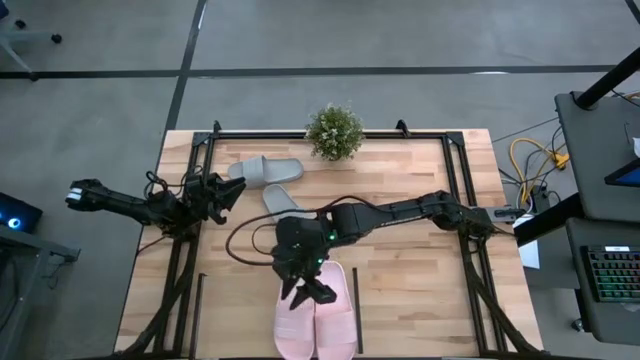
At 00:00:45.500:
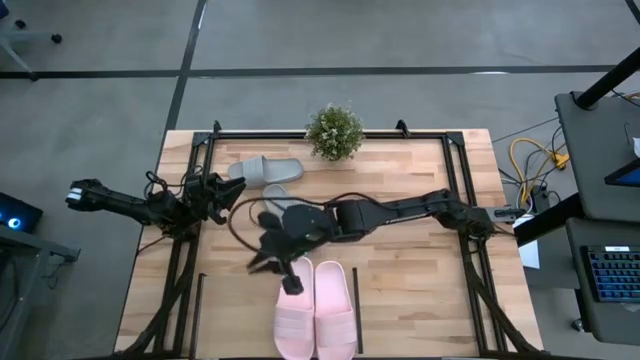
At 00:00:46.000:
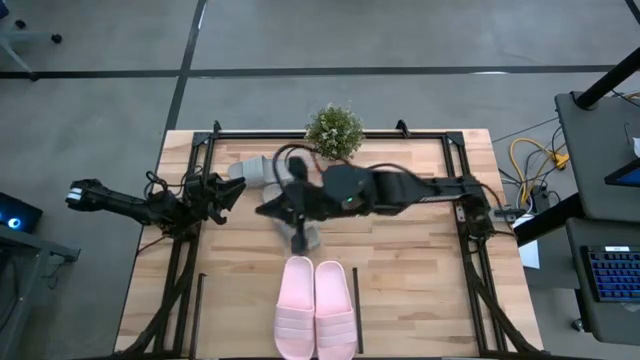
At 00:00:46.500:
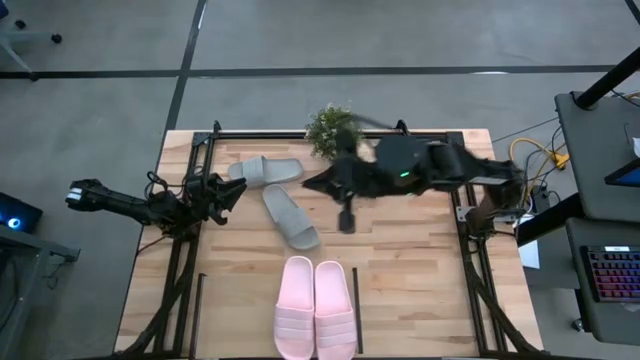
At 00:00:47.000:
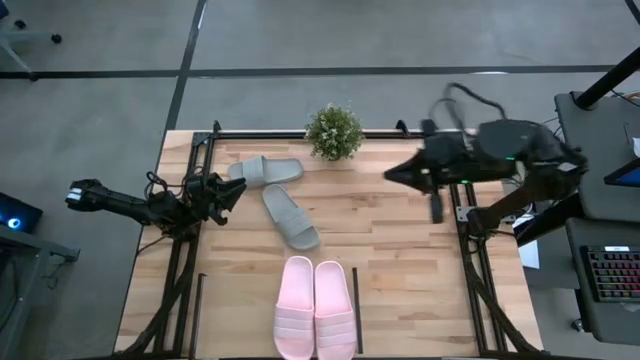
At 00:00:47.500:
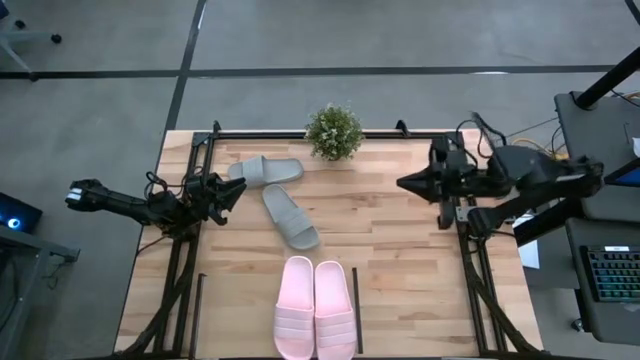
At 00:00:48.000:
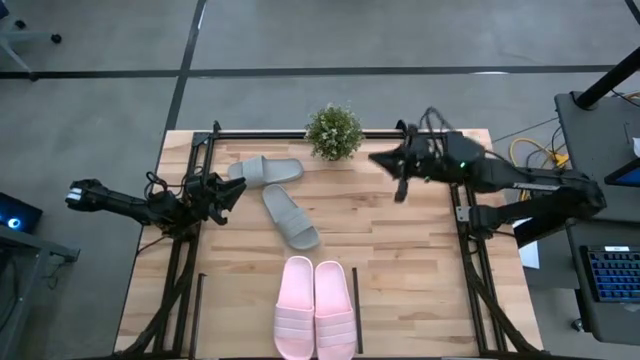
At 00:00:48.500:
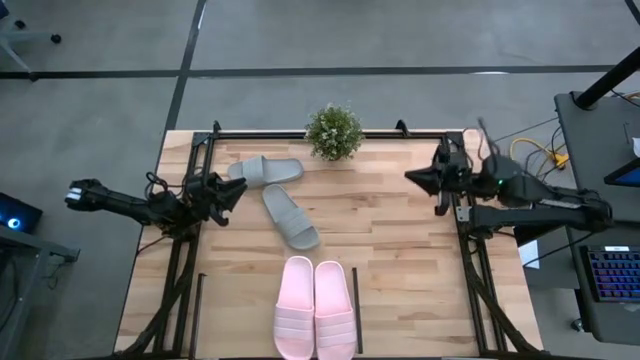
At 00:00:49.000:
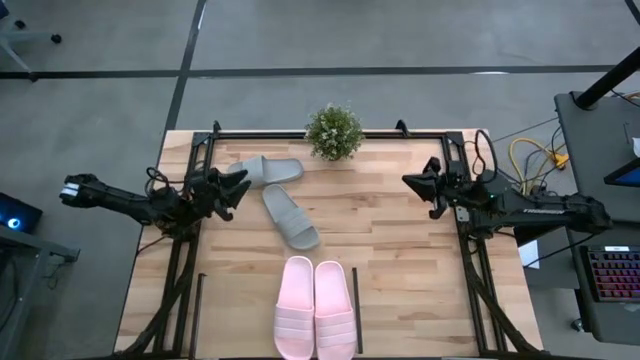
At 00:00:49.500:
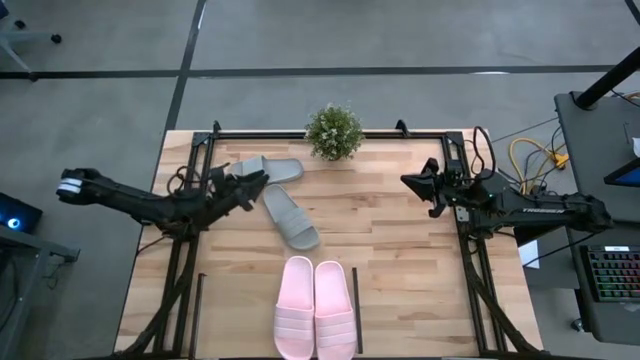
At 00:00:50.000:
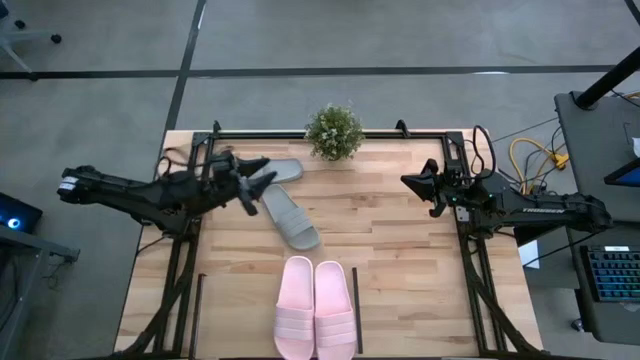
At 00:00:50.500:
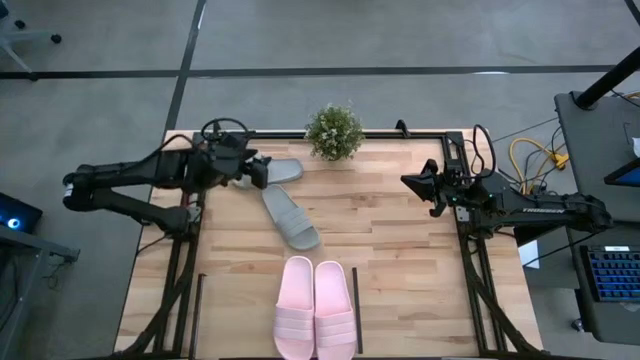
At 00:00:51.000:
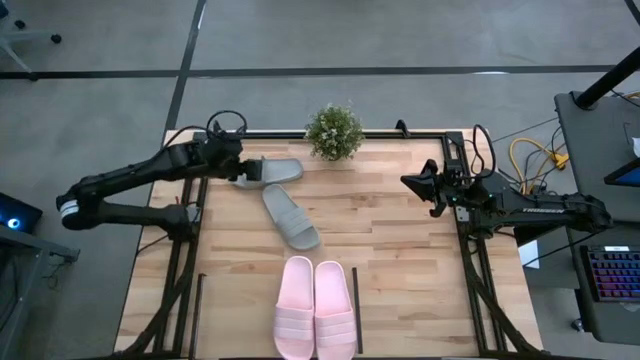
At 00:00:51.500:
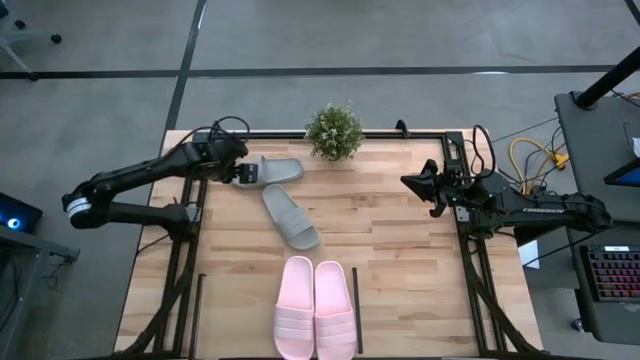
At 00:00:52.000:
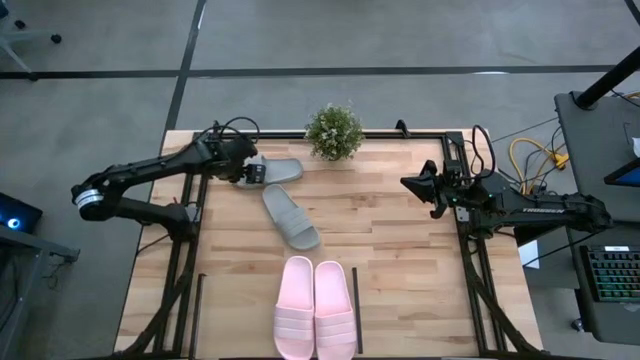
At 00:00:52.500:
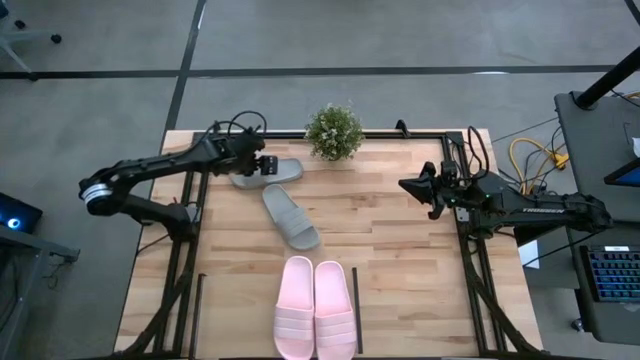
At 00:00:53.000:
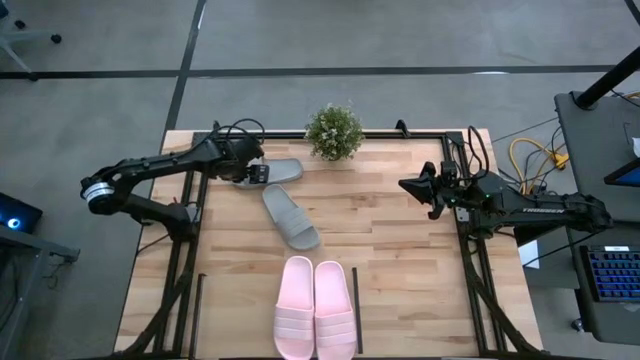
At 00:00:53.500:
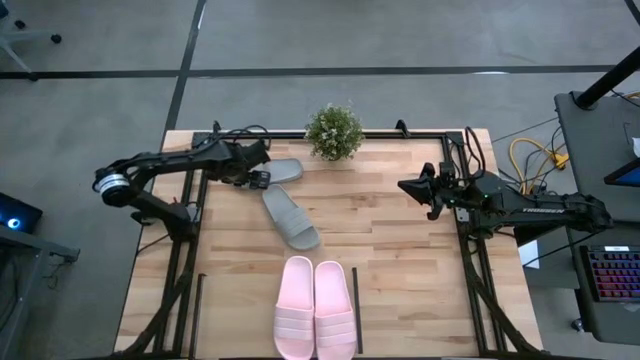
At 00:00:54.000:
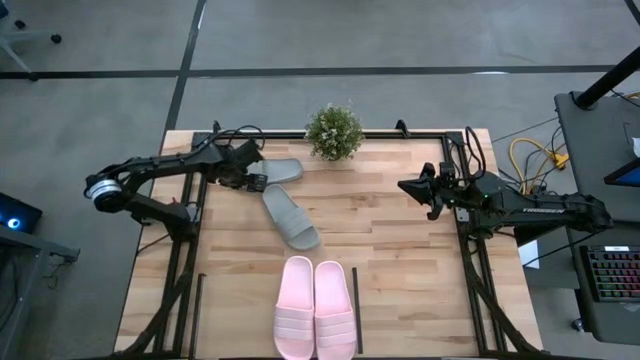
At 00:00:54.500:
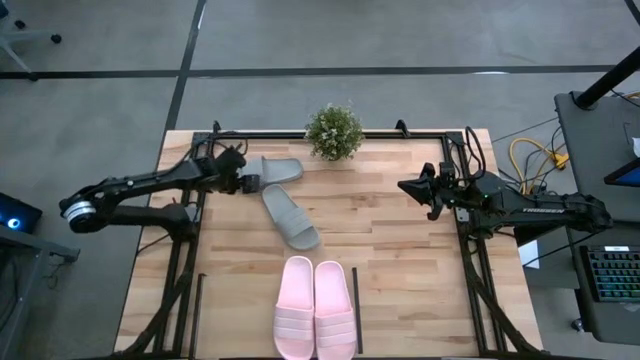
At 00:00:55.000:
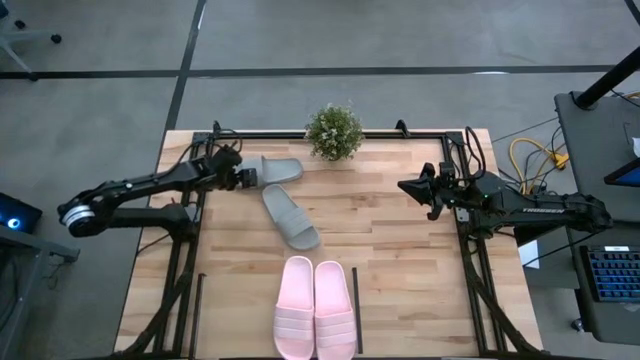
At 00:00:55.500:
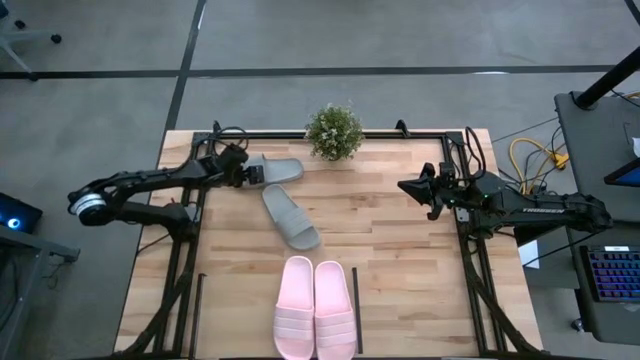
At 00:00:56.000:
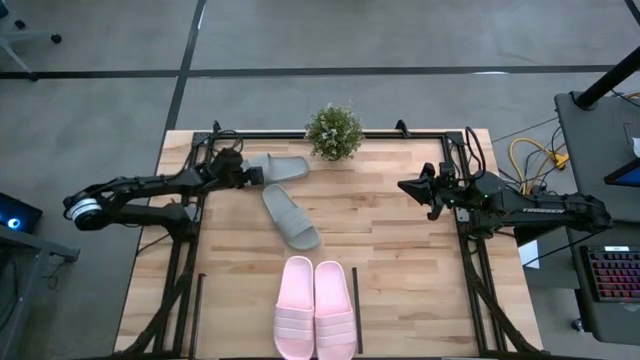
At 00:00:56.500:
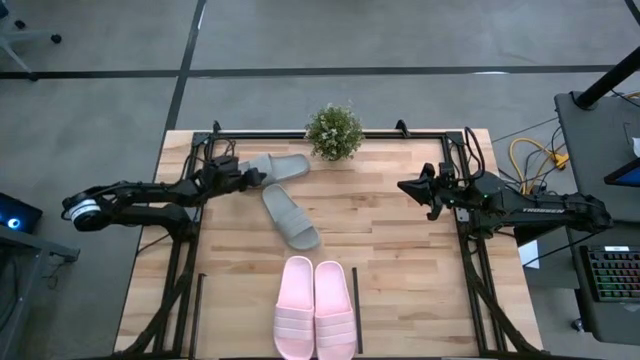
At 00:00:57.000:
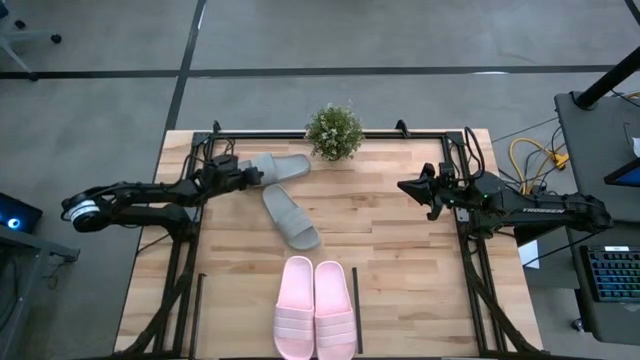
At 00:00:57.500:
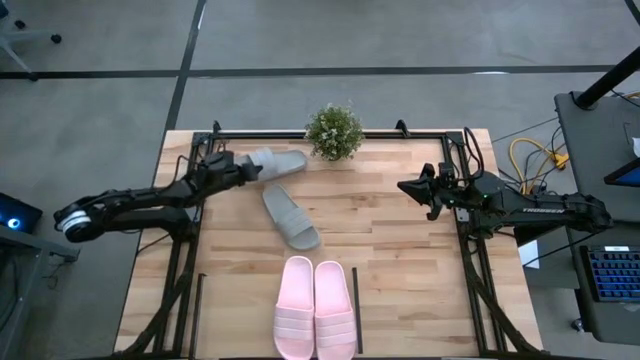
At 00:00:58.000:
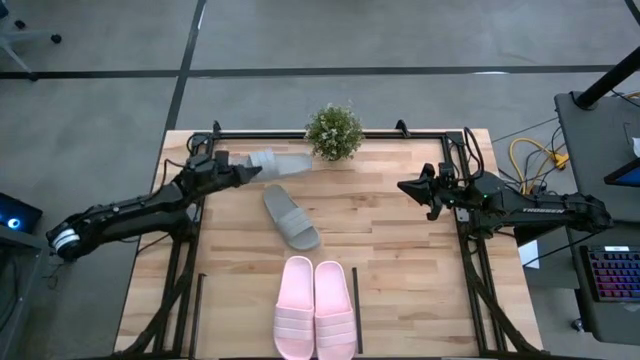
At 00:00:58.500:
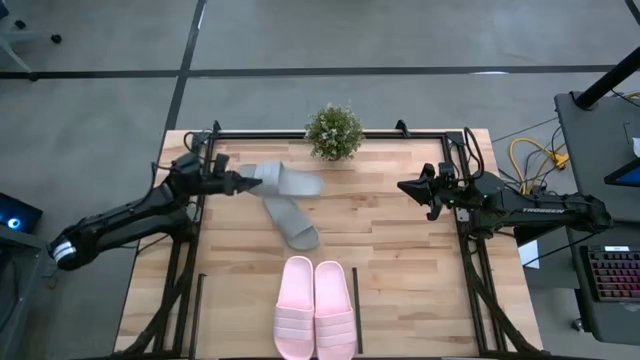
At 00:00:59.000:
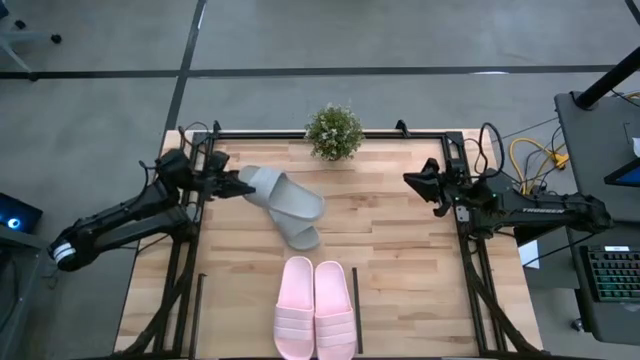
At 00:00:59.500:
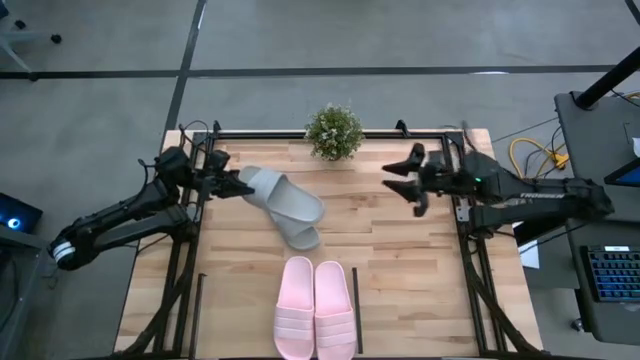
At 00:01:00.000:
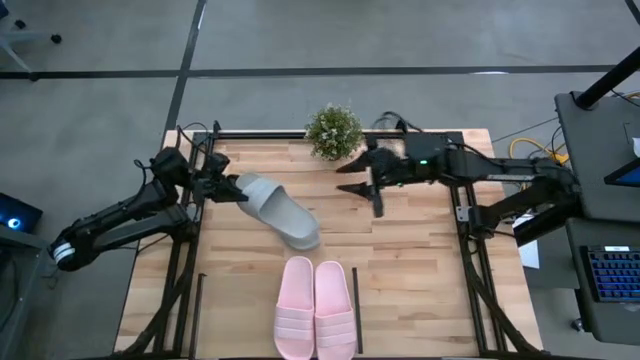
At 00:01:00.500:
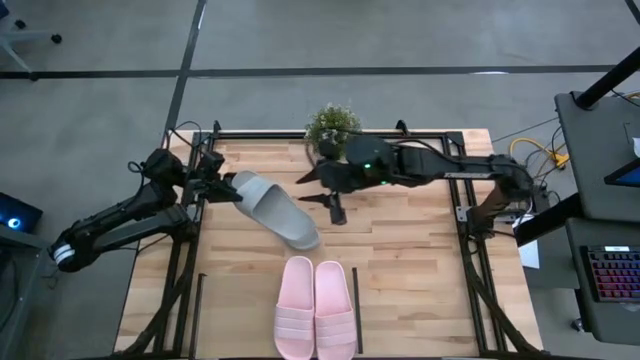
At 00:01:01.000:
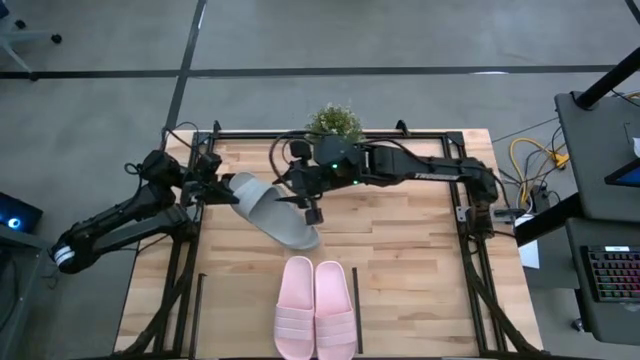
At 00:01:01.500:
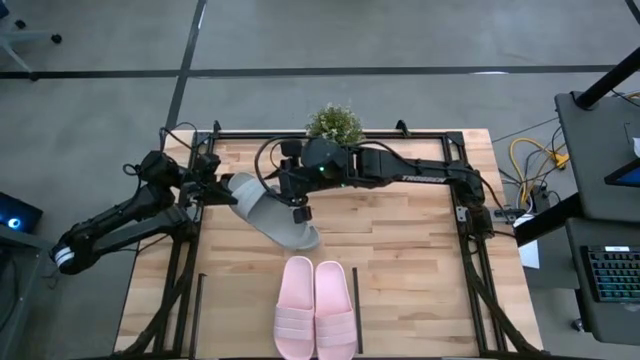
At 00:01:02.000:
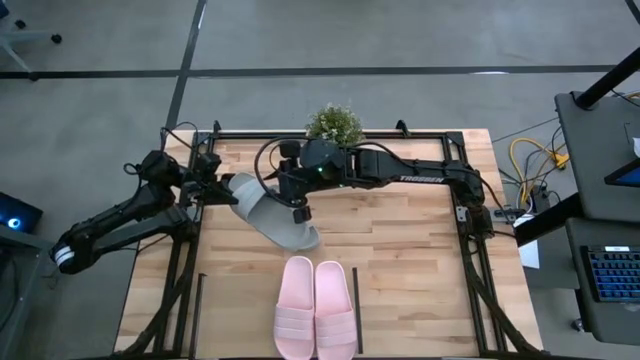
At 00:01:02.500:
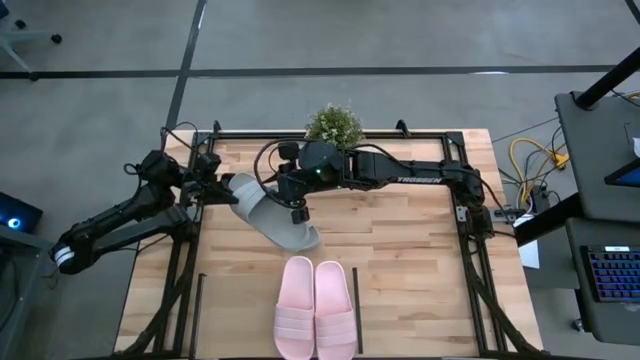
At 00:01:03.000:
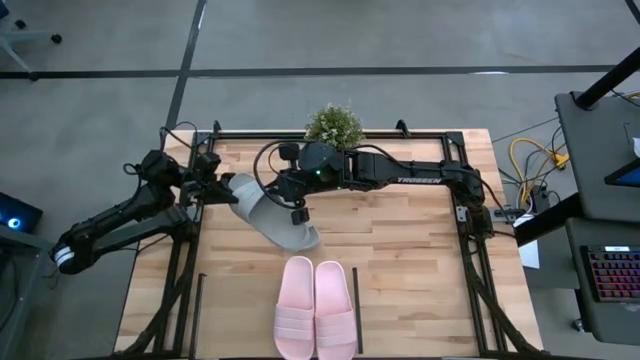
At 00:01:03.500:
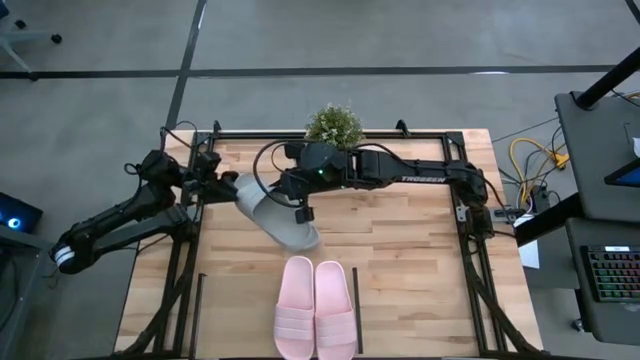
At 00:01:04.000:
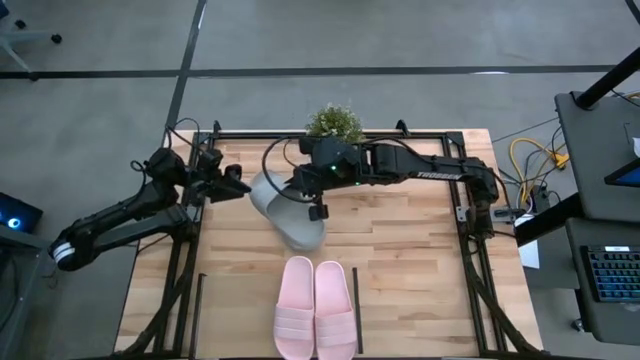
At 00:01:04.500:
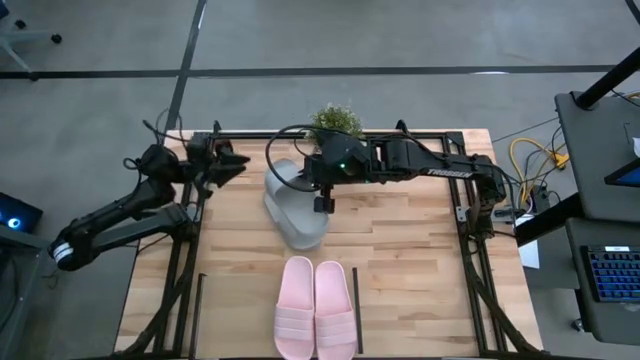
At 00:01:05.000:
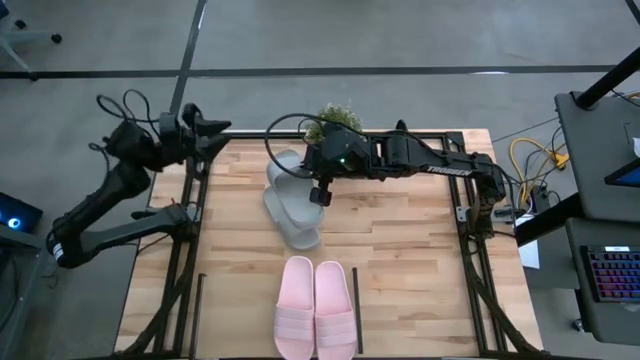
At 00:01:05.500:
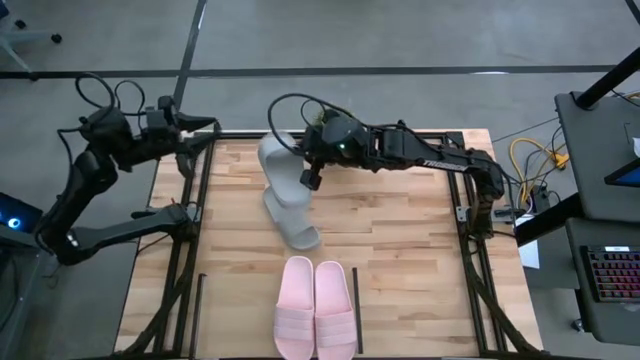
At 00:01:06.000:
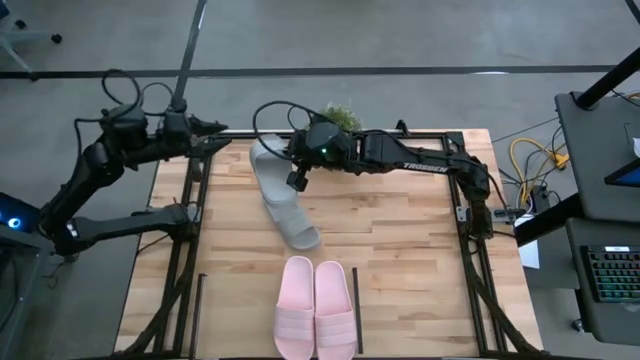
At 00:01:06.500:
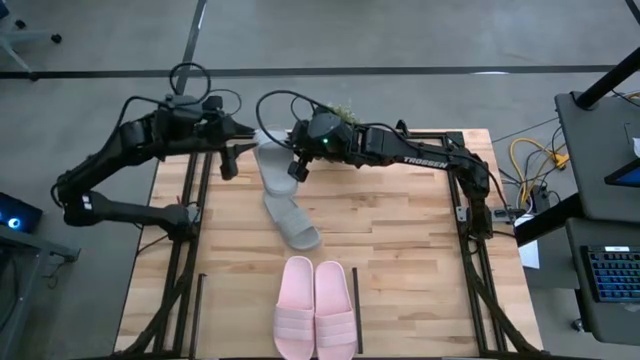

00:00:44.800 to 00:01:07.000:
Task: Pick and place slides into the shelf
Put the top gray slipper on the shelf
